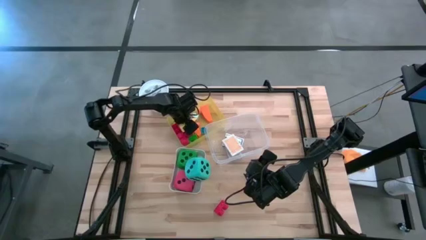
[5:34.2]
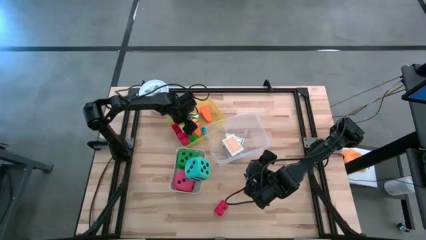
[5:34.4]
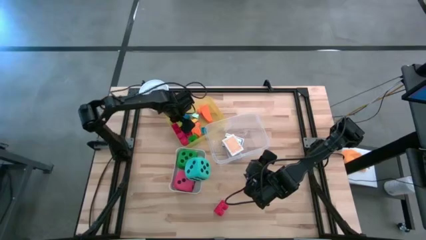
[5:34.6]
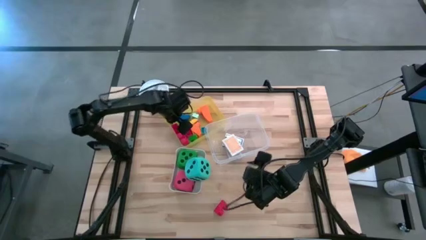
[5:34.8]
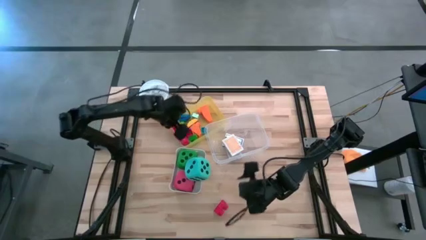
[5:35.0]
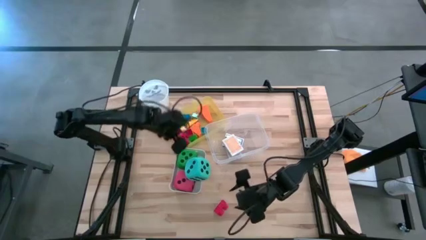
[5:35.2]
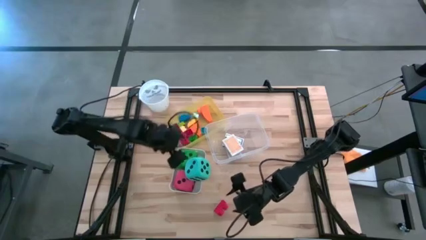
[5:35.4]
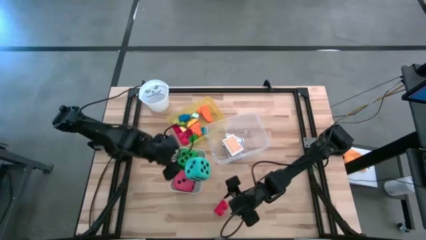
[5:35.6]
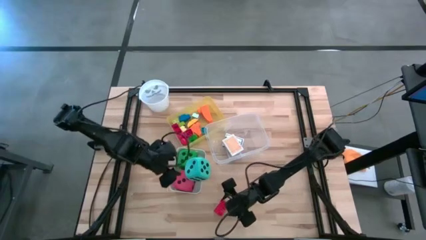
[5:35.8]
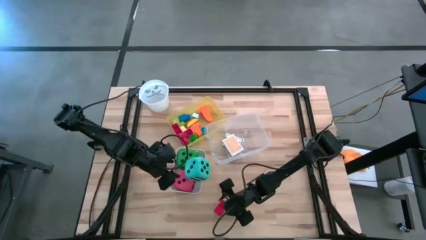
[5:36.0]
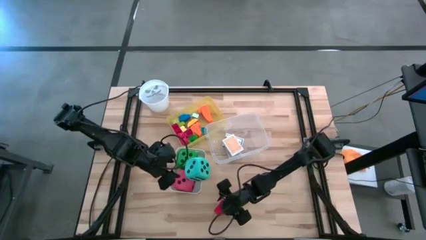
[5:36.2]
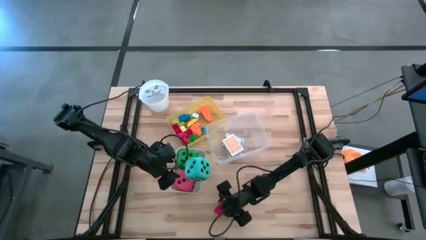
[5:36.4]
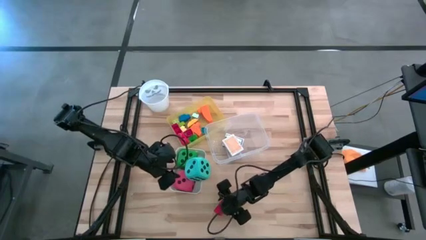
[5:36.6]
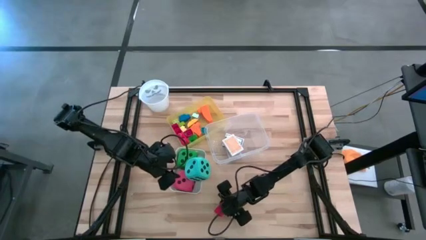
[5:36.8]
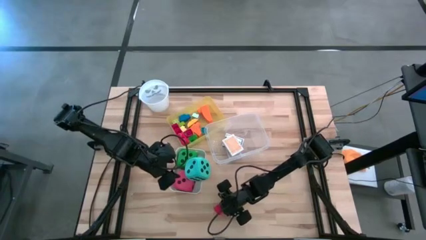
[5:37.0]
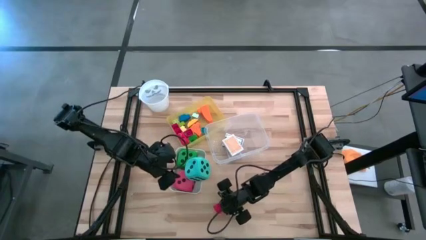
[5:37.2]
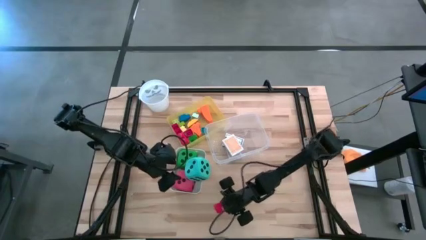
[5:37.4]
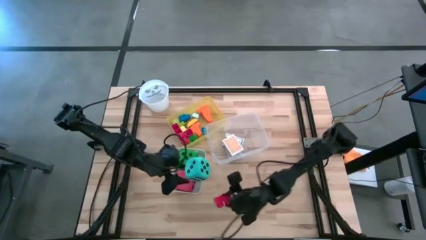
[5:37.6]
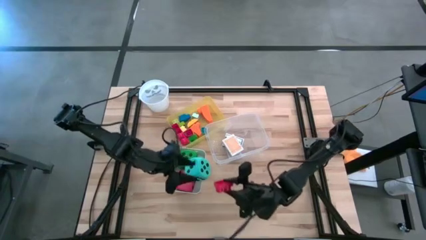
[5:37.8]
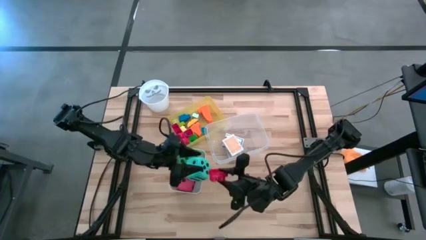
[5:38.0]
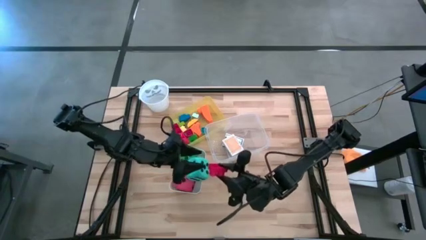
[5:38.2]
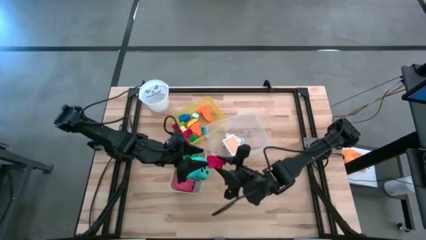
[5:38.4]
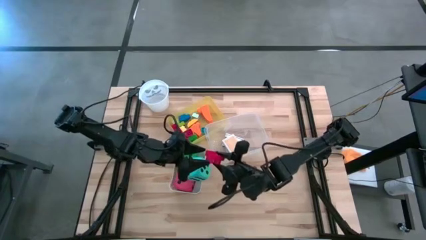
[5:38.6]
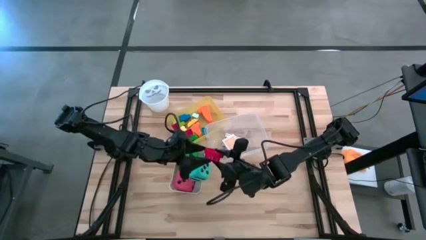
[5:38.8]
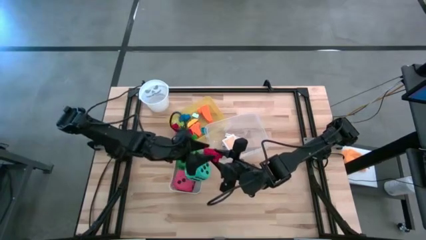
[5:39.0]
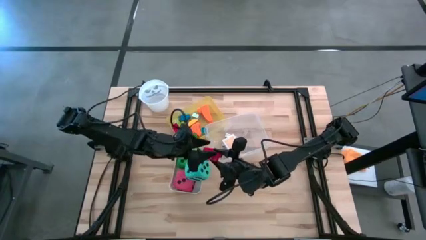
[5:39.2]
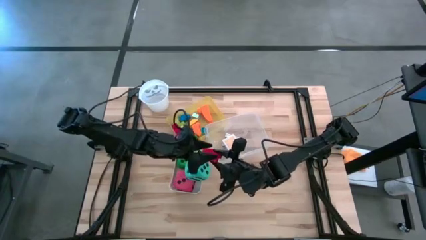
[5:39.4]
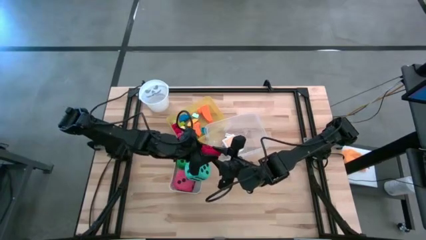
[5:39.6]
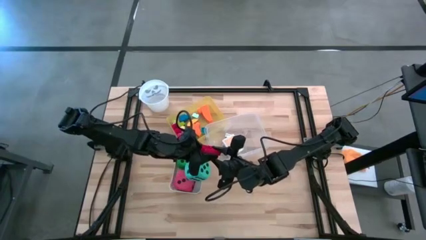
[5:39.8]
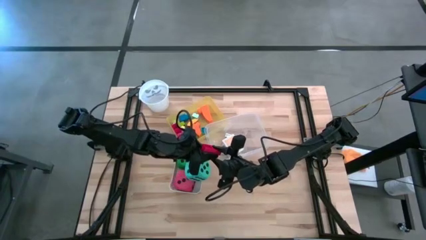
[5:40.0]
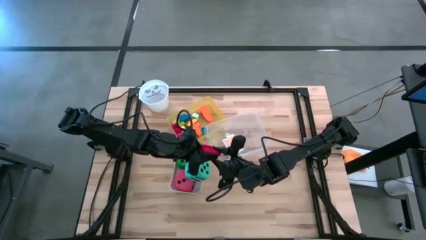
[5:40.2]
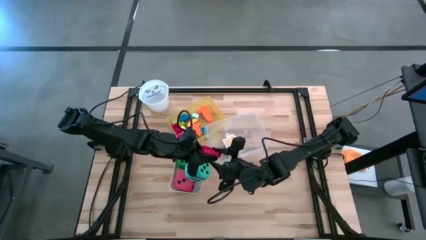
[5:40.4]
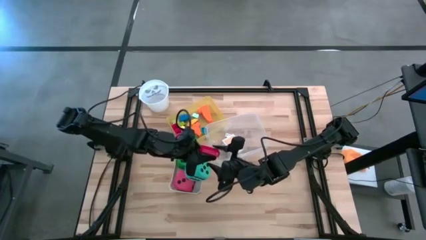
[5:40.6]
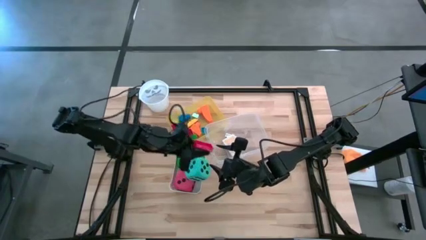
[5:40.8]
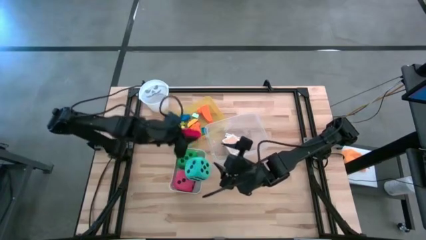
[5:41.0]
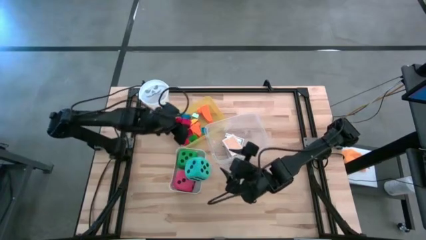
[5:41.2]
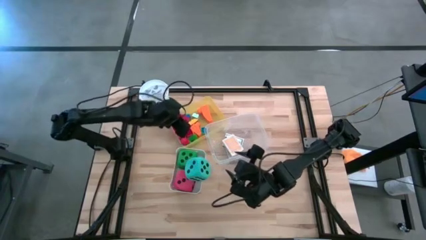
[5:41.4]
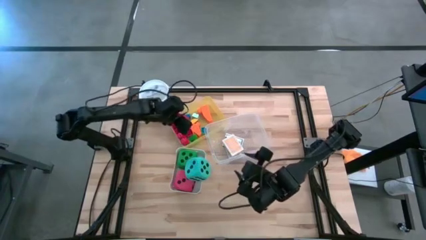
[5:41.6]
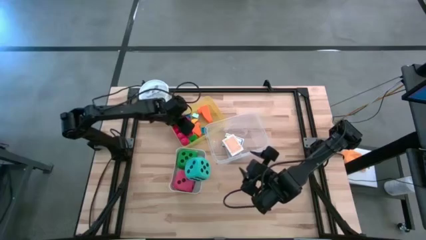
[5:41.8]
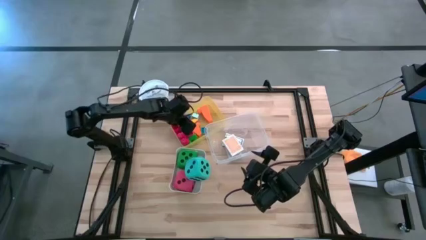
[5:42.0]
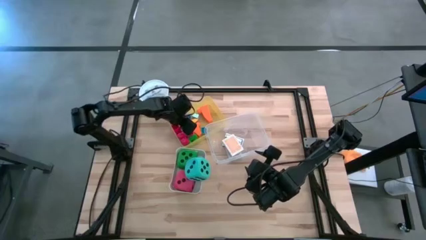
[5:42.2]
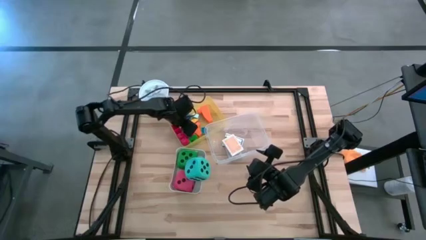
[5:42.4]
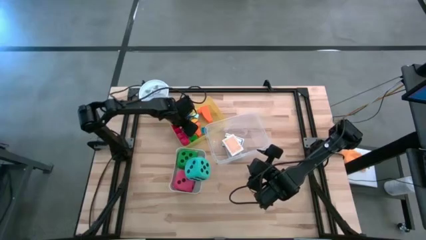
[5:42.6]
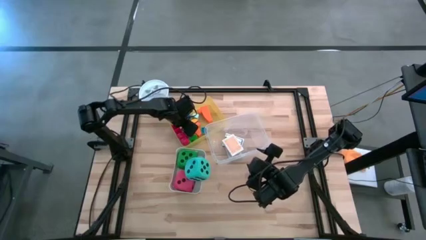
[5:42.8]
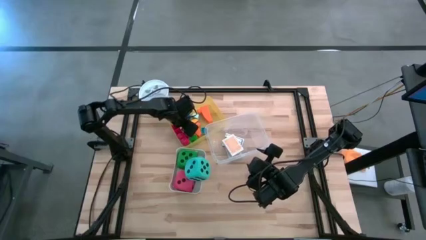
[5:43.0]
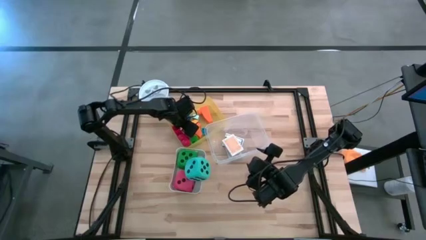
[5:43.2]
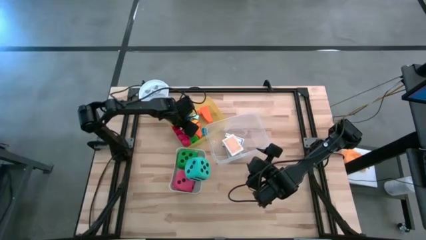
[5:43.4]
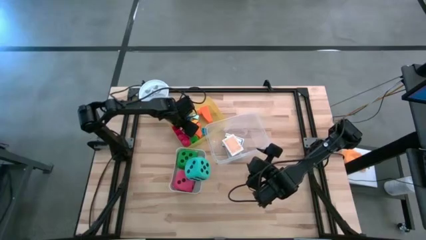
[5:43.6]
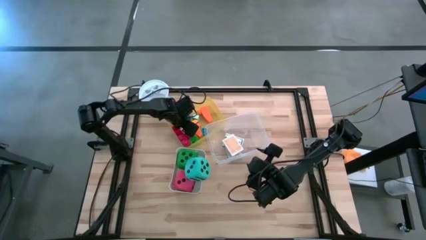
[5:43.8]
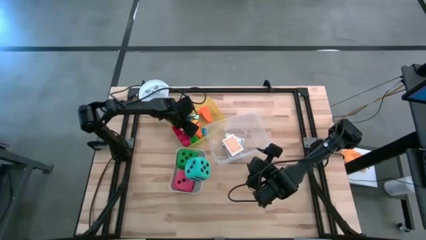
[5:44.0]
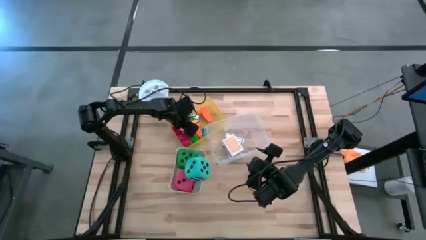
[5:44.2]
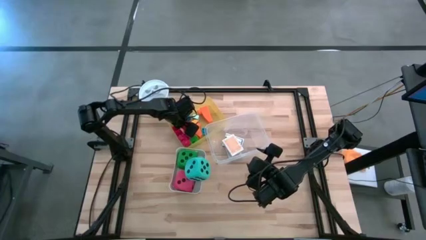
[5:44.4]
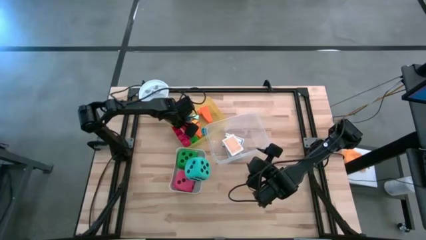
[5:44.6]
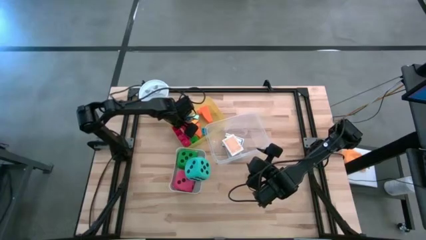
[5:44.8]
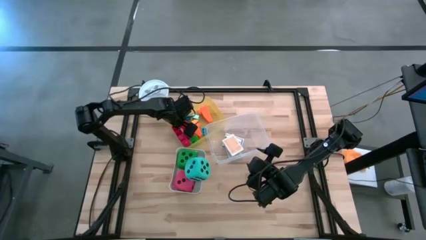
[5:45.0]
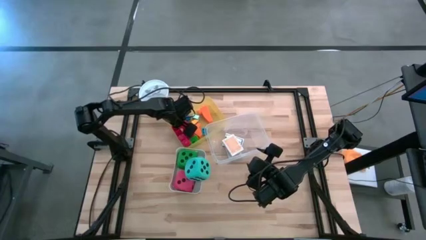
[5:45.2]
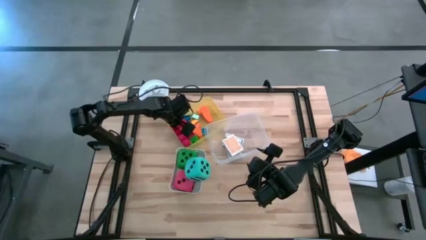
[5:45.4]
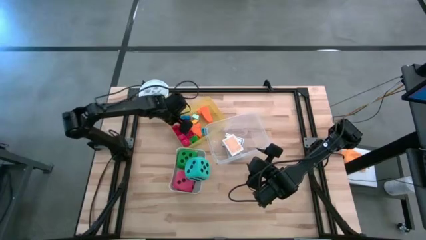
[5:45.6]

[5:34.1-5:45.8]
Task: Pick & Place Toys
Put the red game piece into the yellow bin

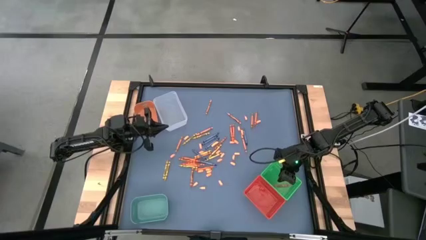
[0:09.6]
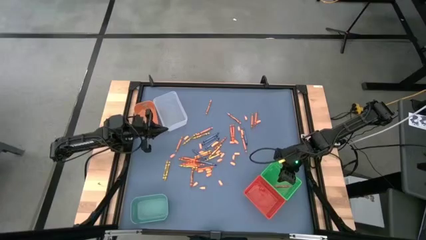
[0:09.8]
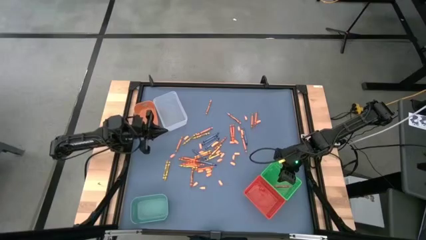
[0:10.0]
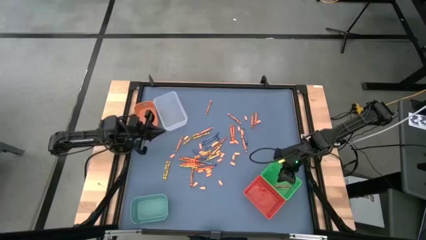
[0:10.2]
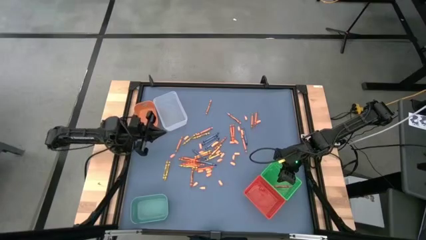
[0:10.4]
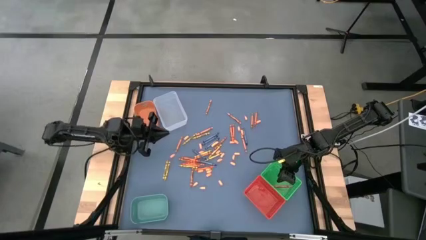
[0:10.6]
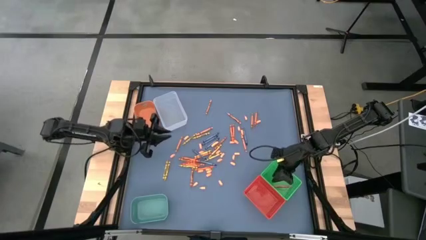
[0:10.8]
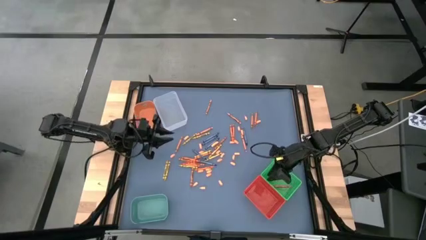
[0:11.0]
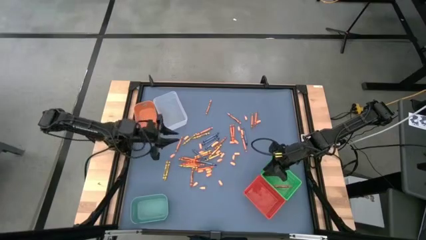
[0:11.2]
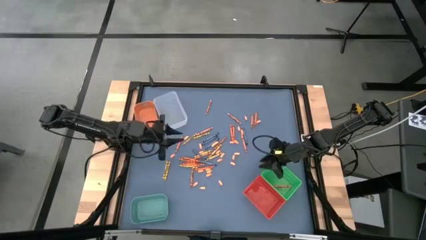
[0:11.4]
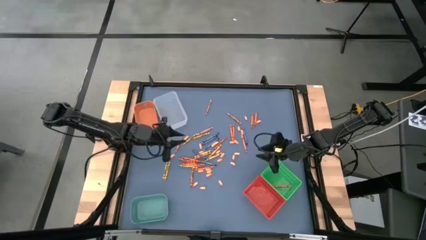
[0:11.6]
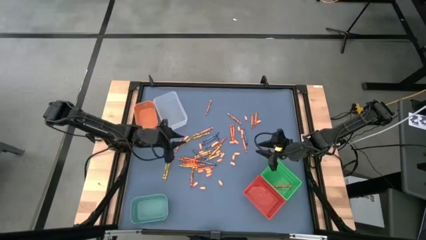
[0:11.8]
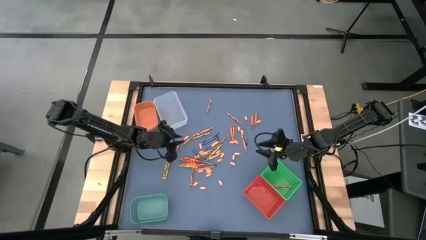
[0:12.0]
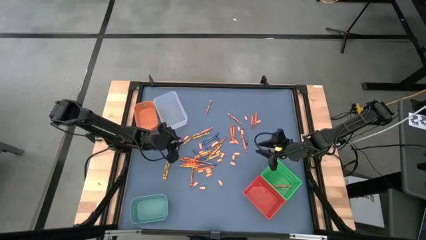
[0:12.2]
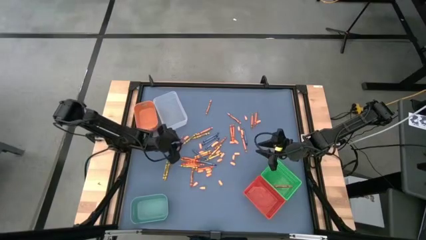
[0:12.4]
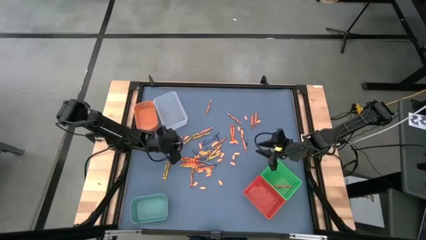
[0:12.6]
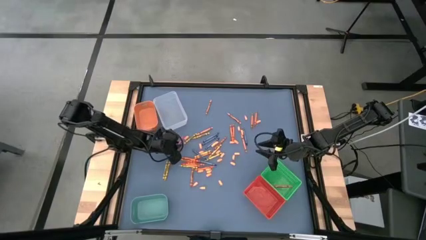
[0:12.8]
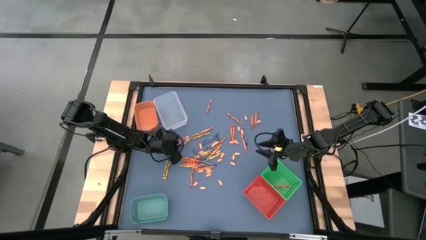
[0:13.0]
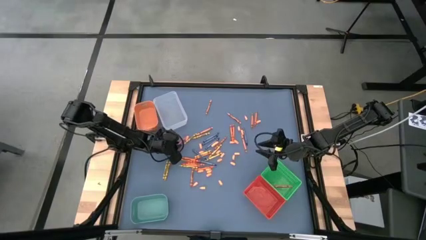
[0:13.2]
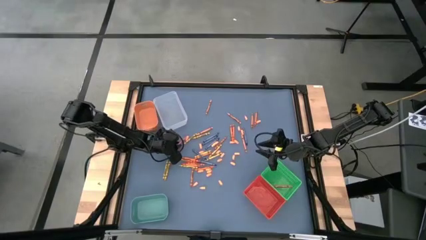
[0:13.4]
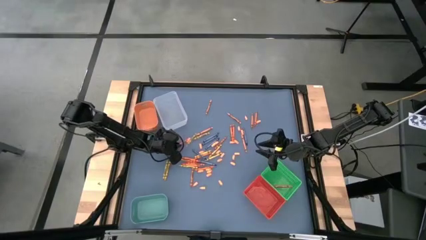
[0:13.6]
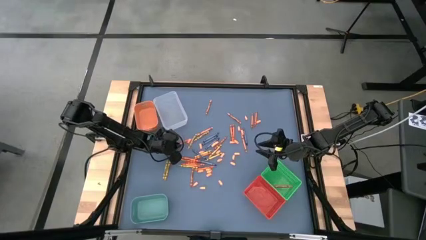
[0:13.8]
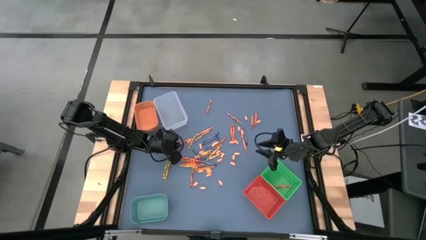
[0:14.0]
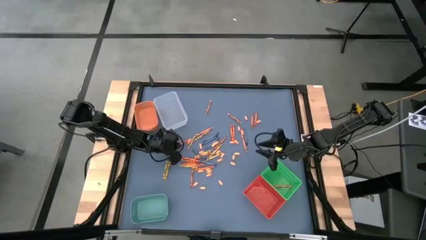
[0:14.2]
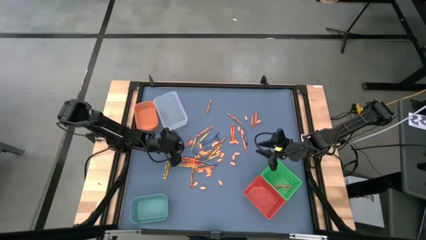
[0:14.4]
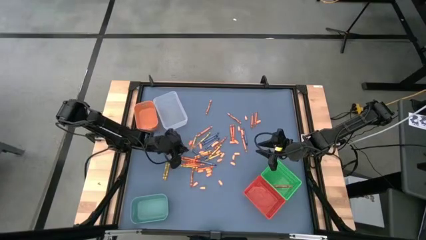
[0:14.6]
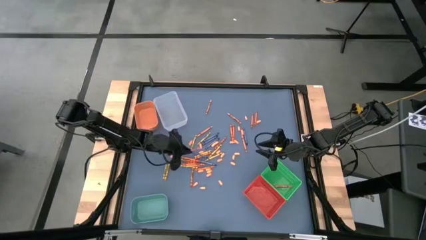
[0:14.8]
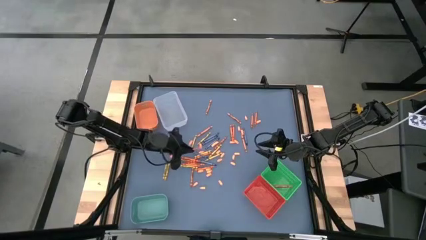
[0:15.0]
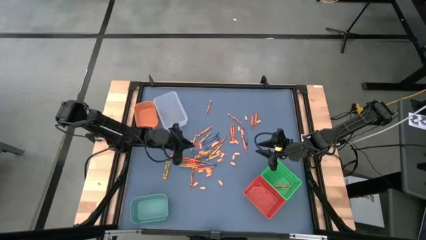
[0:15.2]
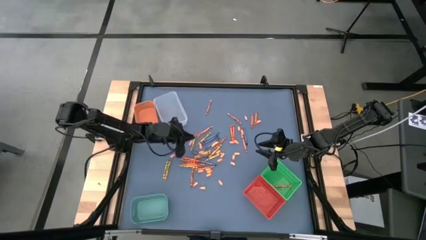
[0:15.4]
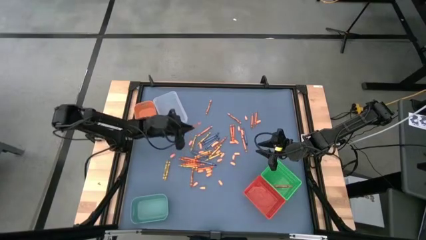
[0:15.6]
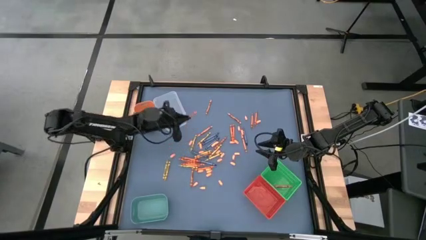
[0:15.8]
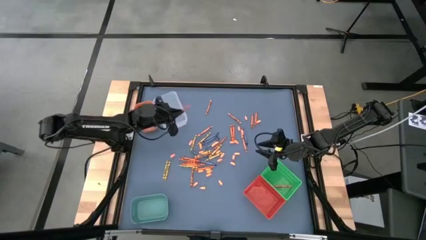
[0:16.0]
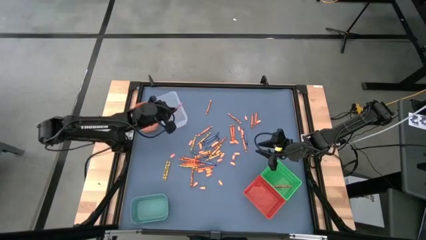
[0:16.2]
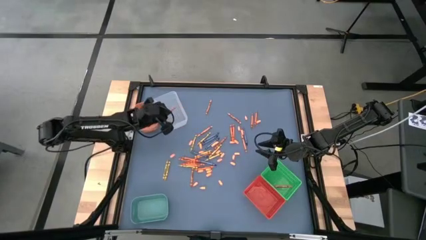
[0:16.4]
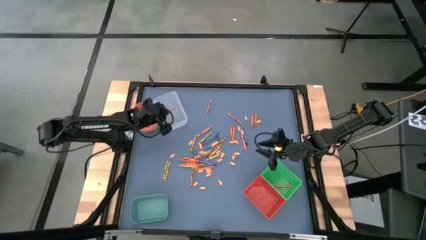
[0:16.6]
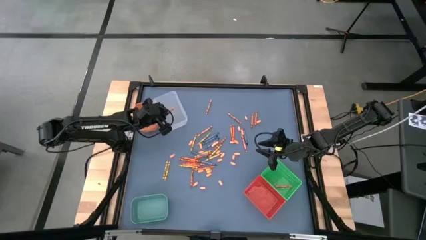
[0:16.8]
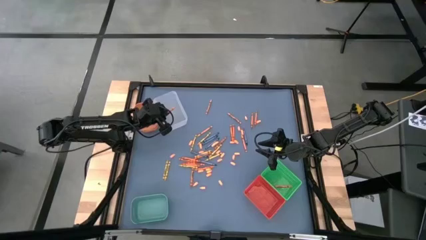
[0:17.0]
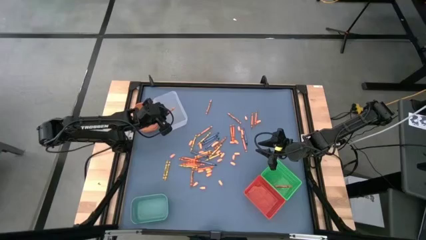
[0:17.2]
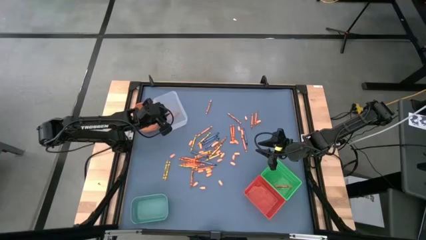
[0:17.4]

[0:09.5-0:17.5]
Task: Sort crayons
Put the orange crayon into the transparent bin
